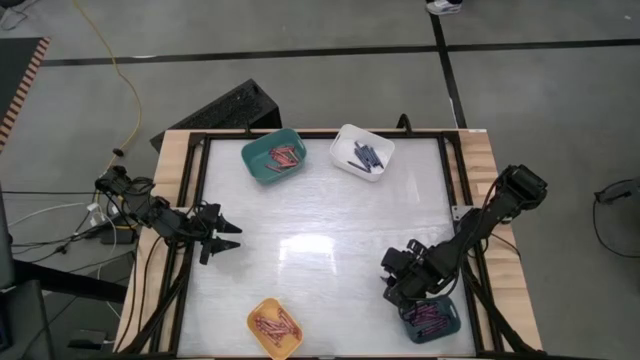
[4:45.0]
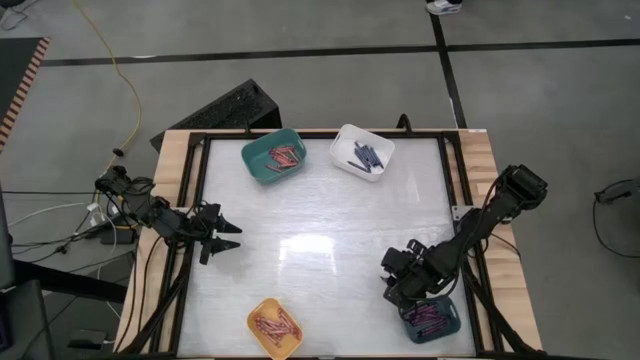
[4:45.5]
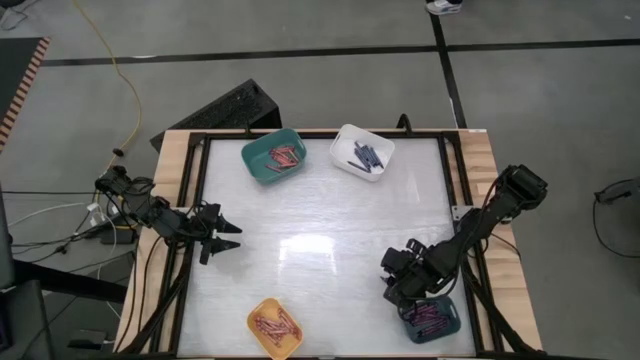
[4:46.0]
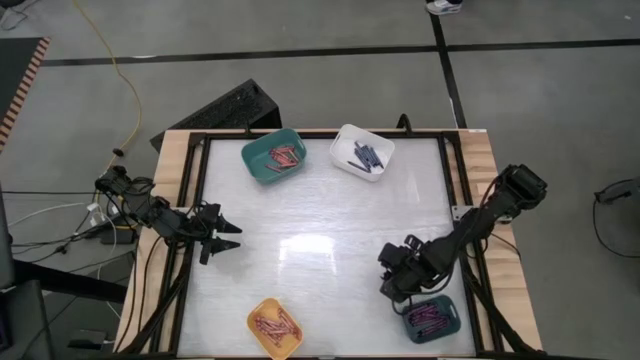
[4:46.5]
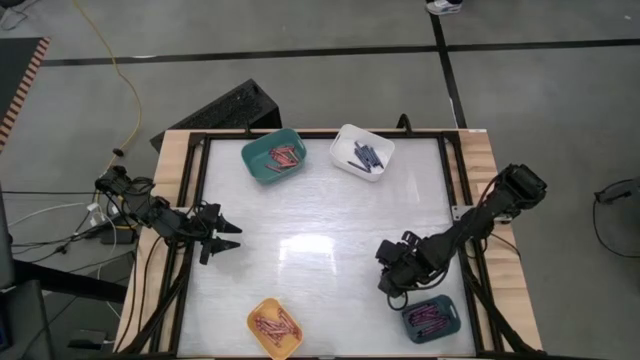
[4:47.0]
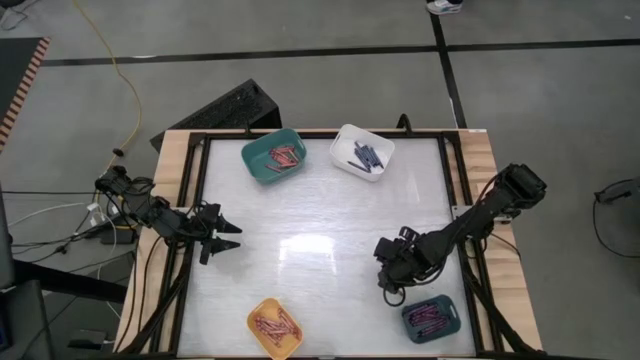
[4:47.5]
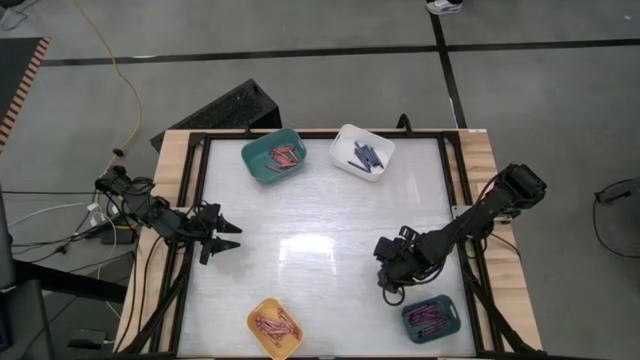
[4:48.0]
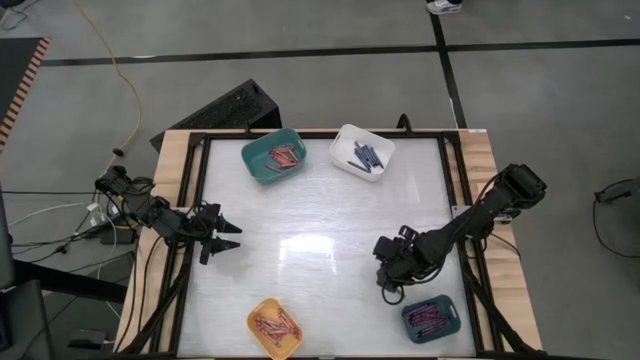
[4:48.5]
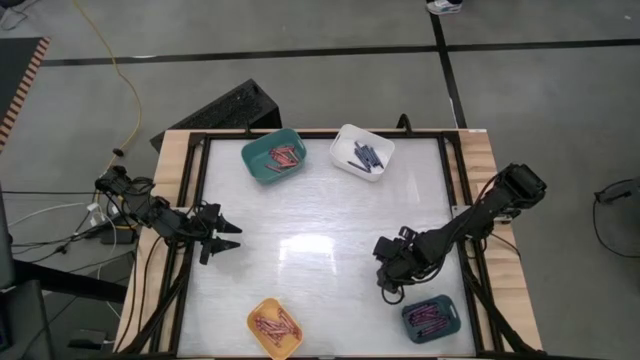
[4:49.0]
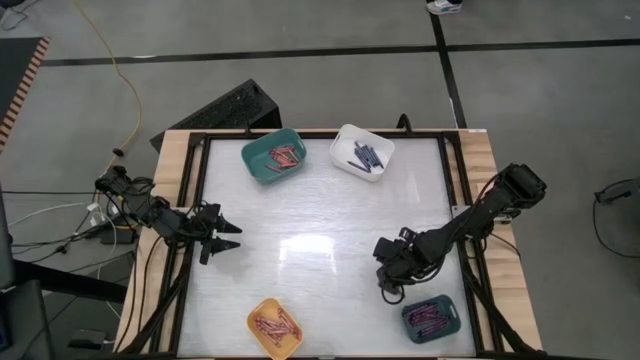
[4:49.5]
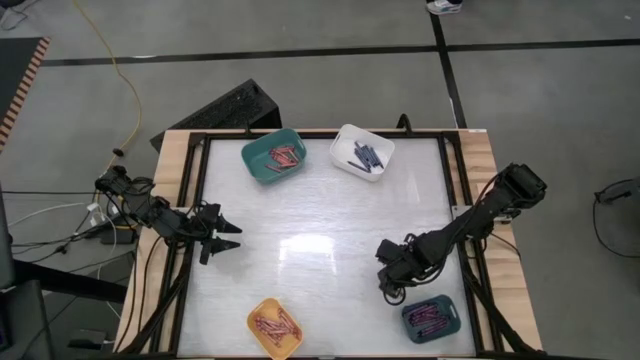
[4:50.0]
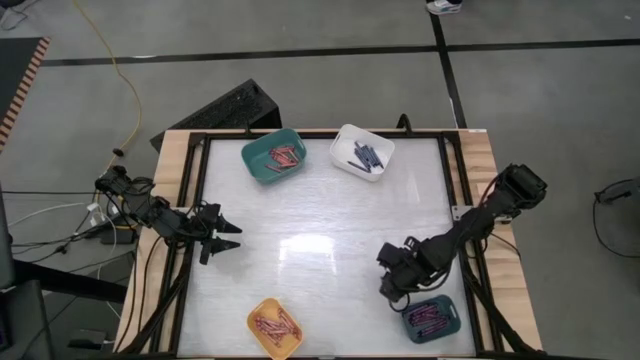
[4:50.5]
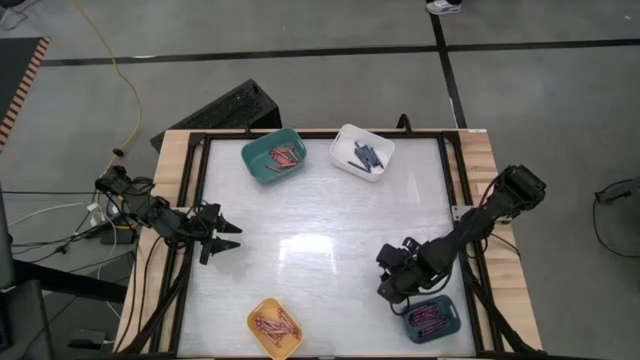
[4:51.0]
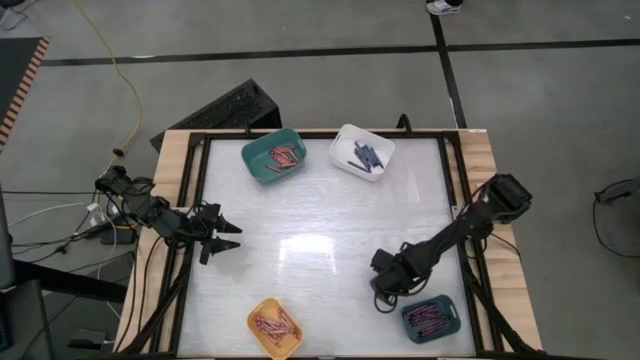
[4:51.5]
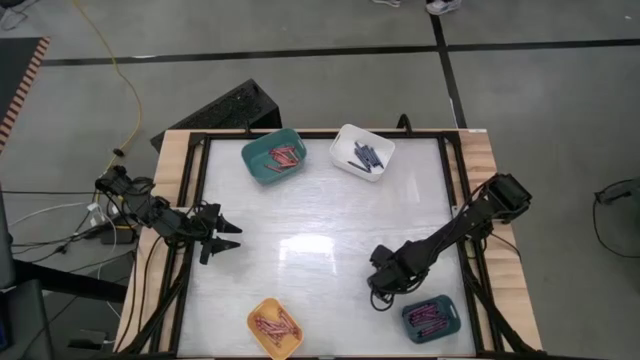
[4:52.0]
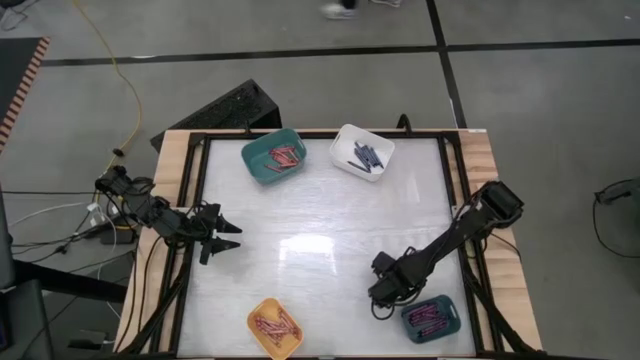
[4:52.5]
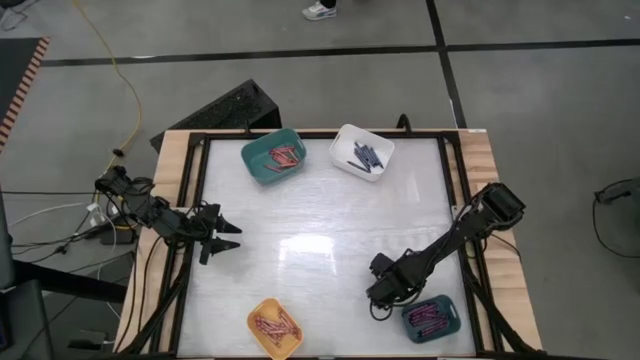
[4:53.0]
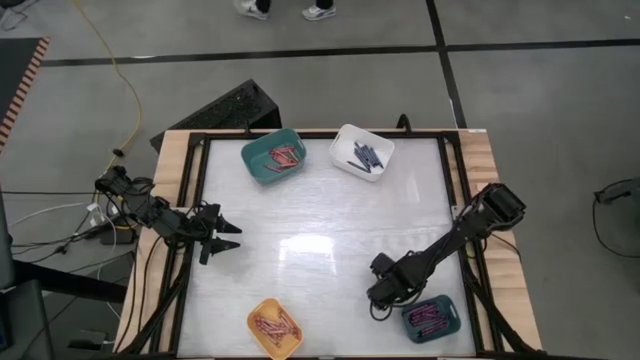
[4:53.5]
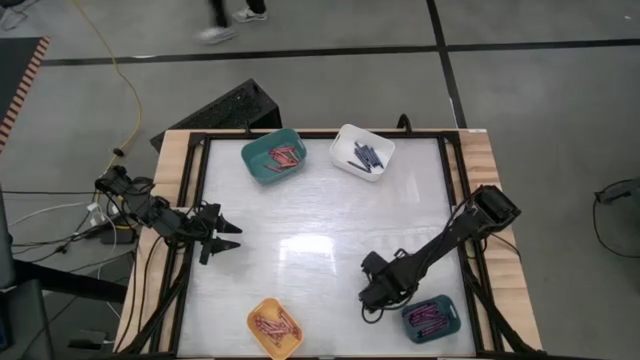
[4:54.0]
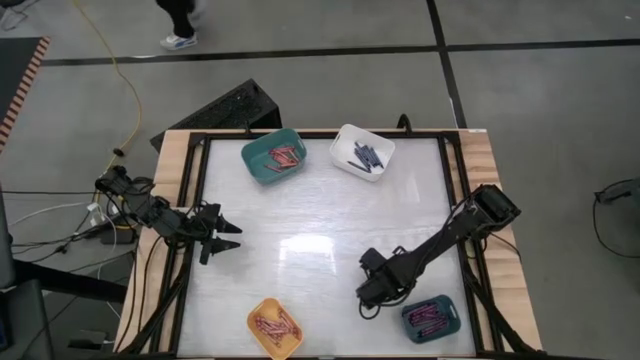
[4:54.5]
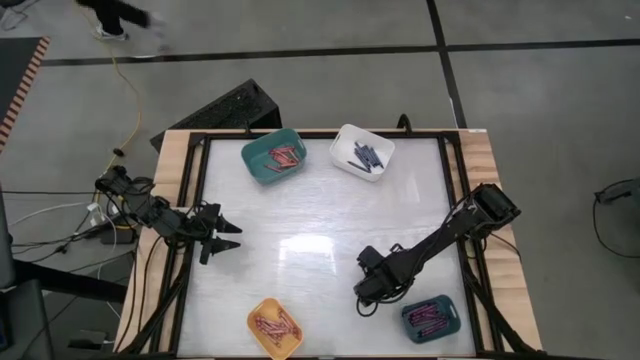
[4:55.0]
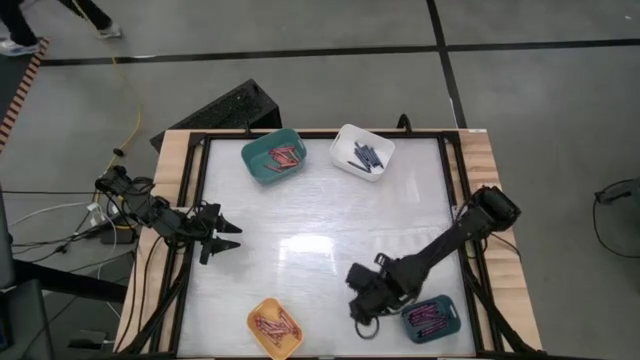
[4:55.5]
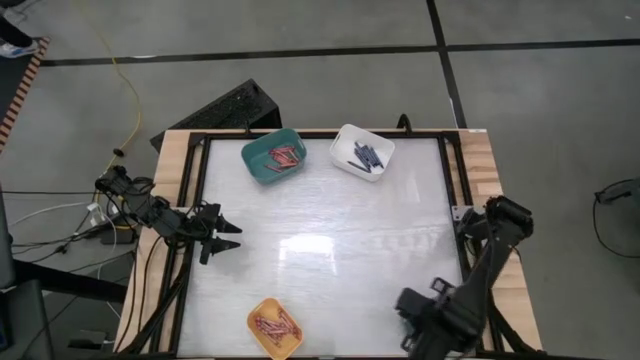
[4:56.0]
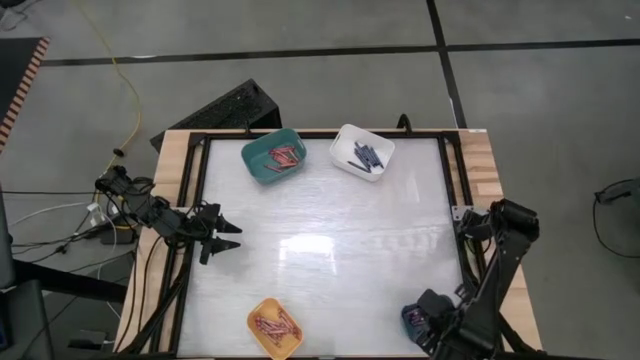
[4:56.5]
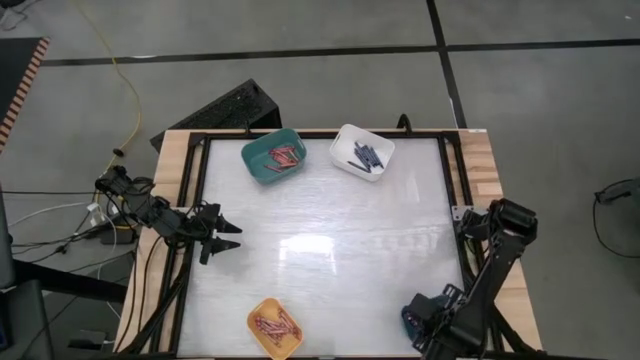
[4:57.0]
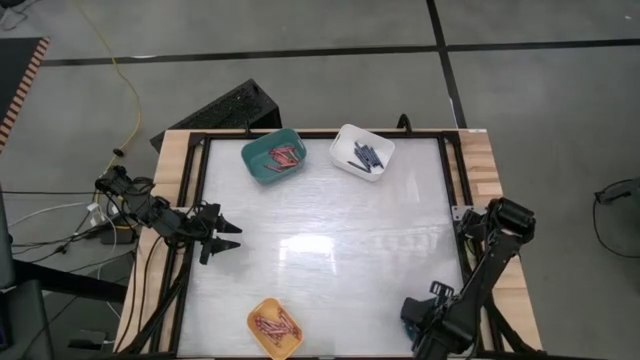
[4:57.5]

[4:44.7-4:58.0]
Task: Sort crayons
Put the purple crayon into the blue bin

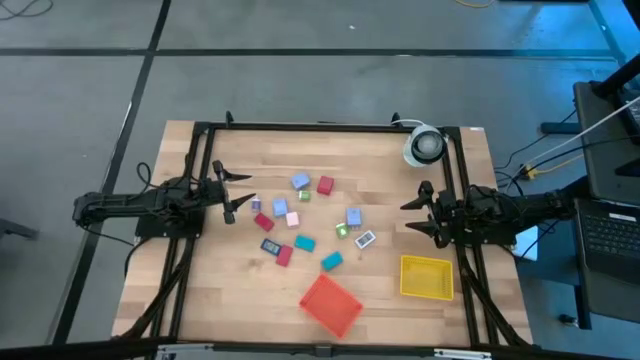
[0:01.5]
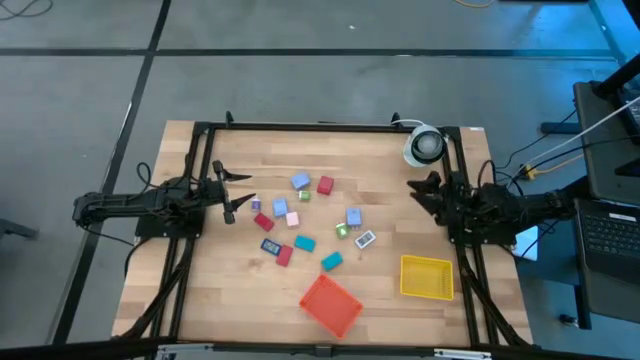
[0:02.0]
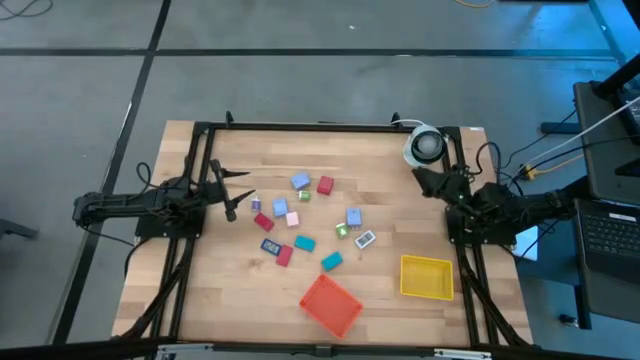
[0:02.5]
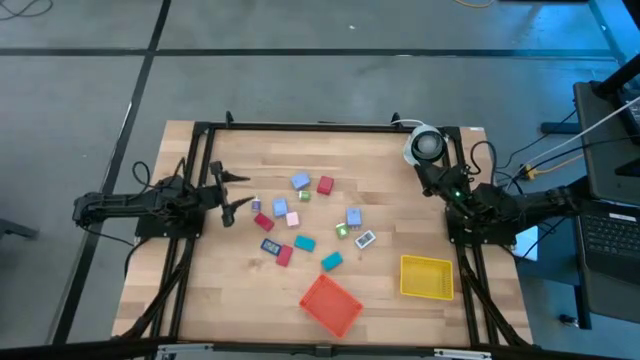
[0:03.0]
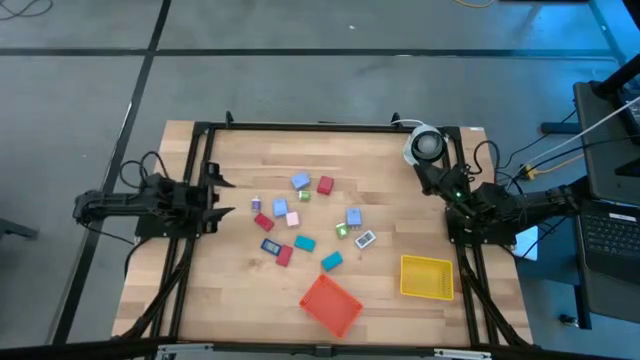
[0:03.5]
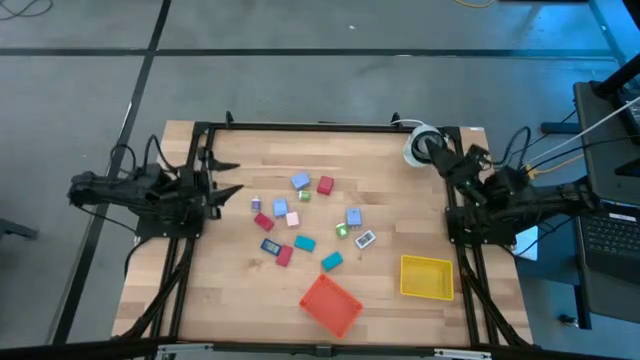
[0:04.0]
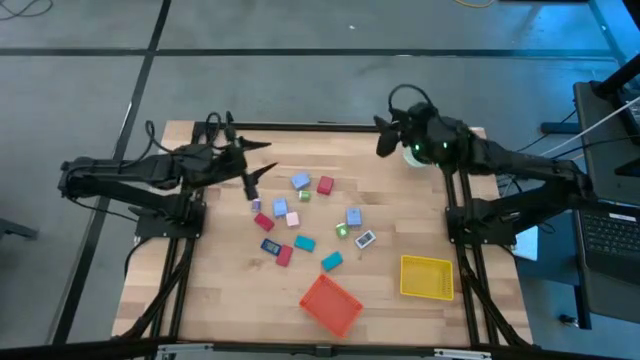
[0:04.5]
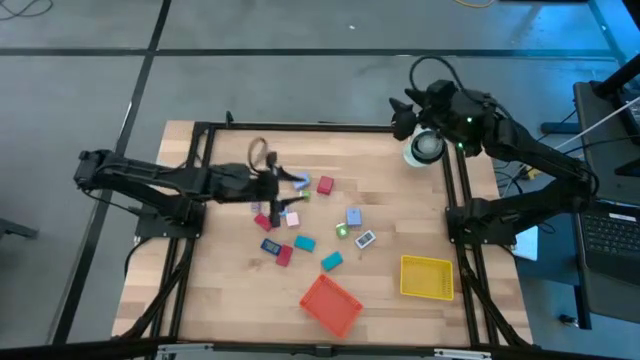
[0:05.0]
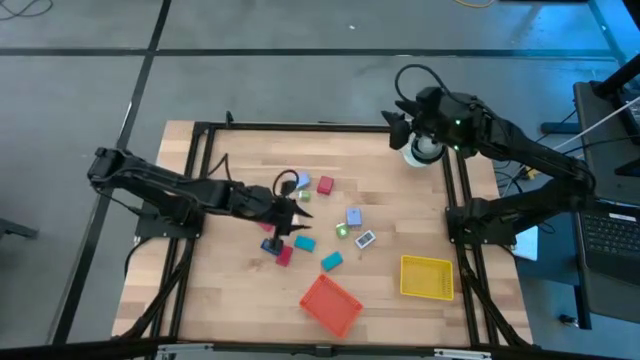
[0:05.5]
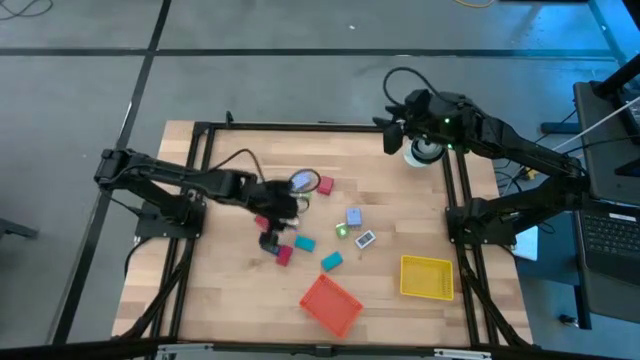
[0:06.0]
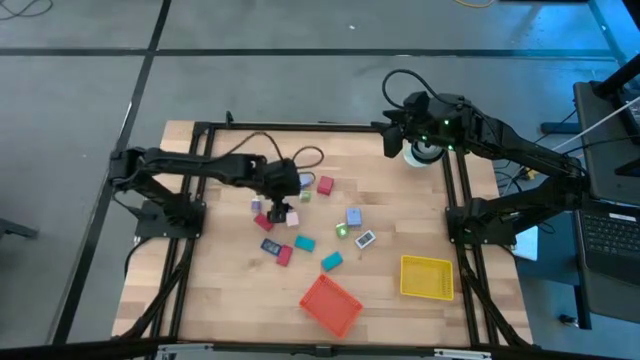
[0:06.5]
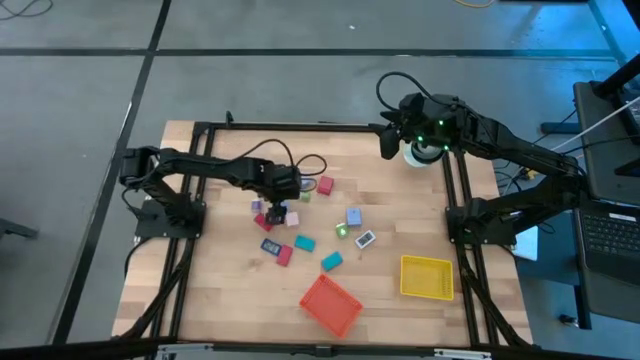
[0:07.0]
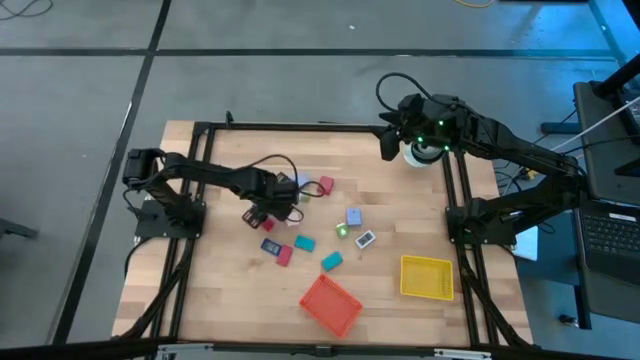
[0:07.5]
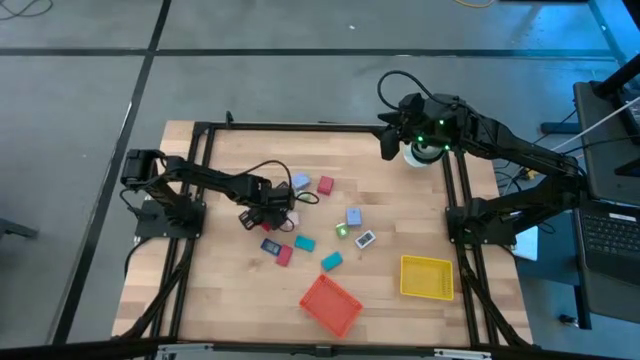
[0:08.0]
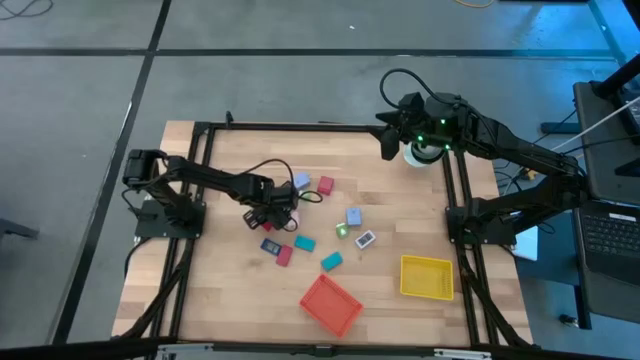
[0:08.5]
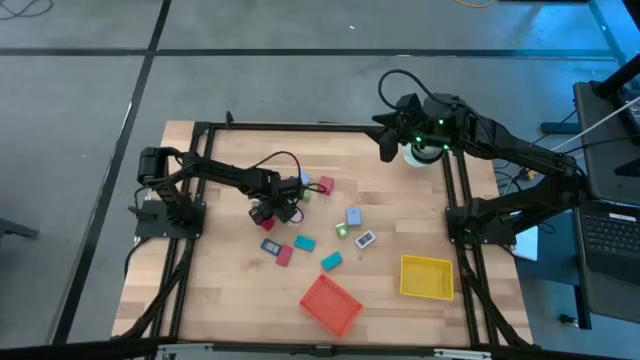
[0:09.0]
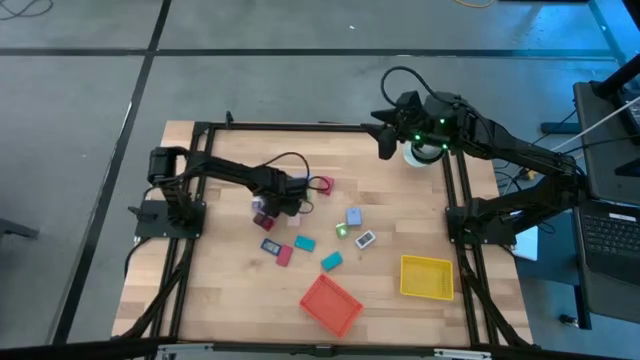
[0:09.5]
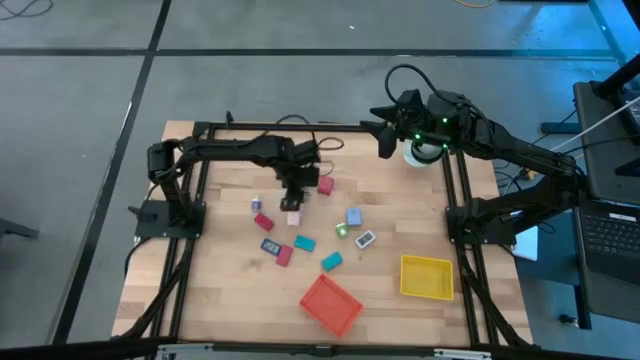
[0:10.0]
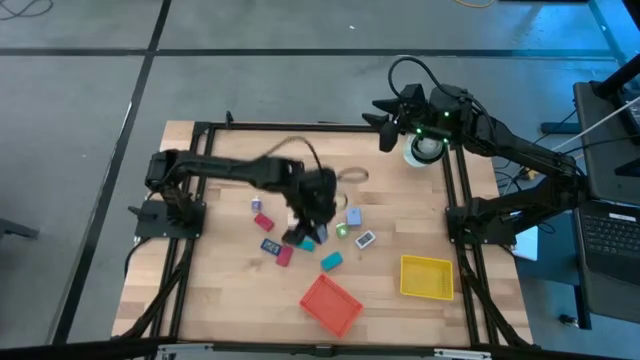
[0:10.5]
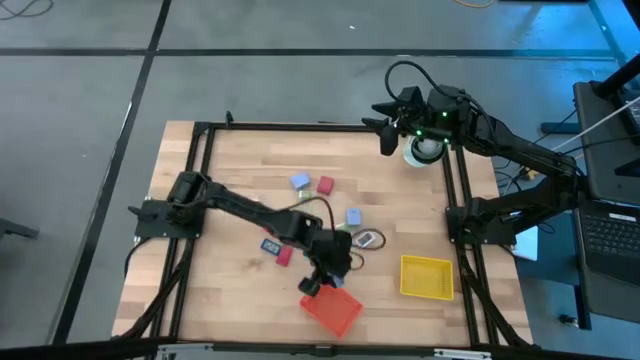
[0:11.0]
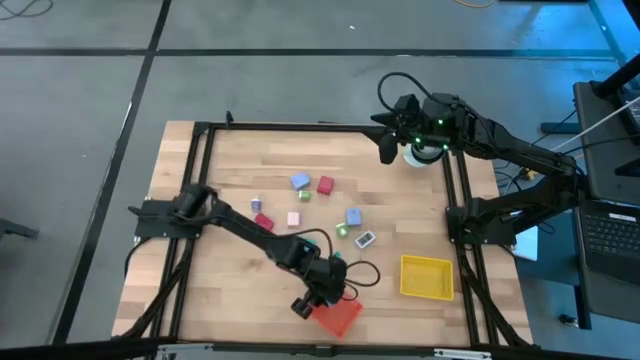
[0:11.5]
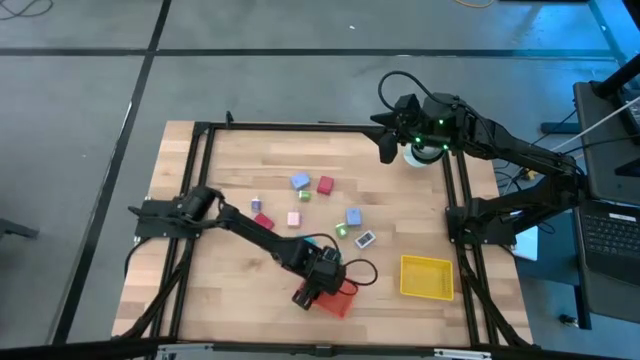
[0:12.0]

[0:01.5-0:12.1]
Task: Pick & Place Office items
Put the left light violet charger adapter into the orange bin
